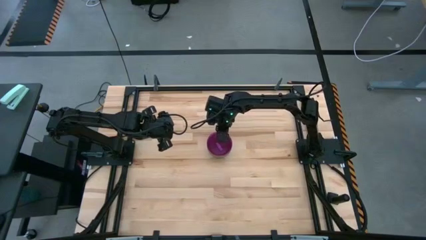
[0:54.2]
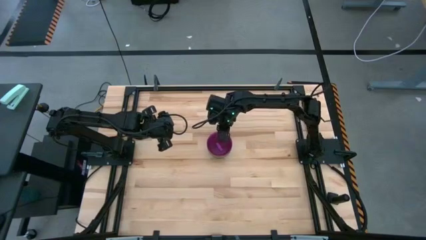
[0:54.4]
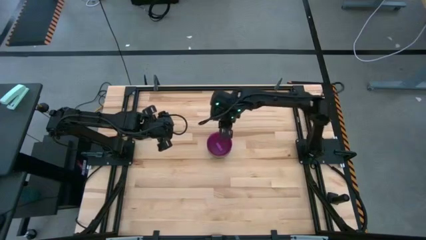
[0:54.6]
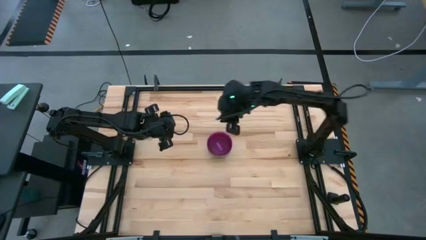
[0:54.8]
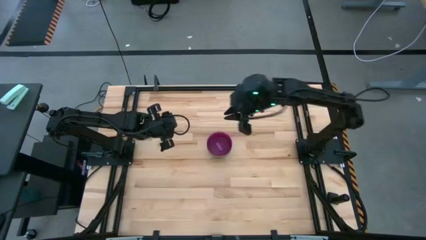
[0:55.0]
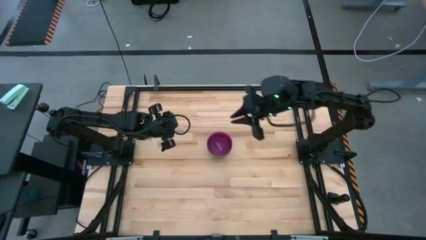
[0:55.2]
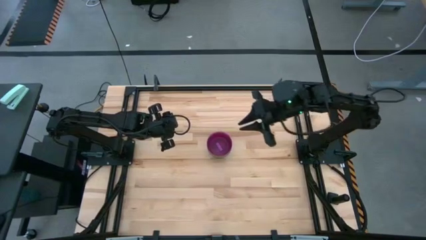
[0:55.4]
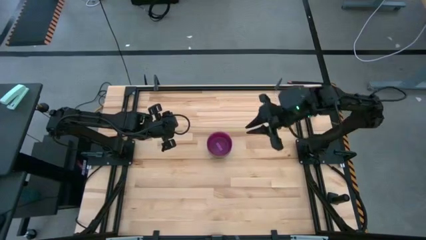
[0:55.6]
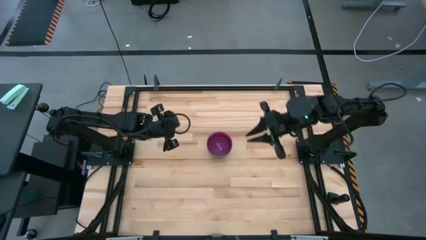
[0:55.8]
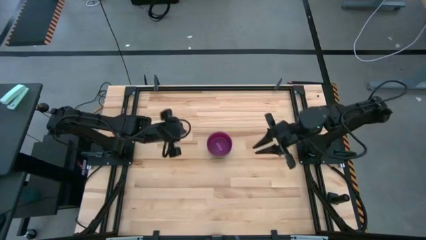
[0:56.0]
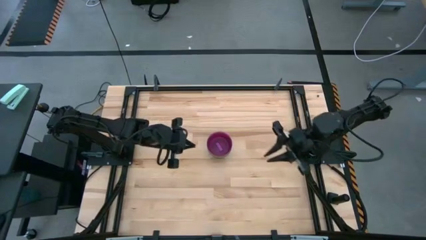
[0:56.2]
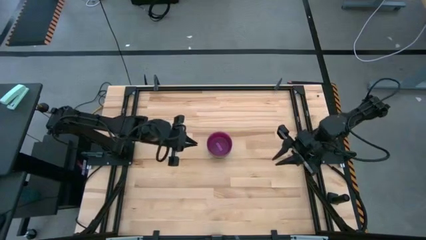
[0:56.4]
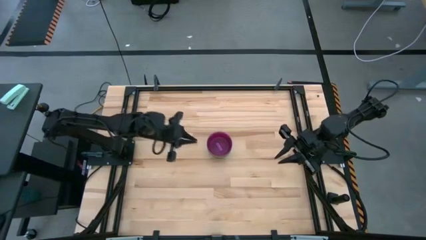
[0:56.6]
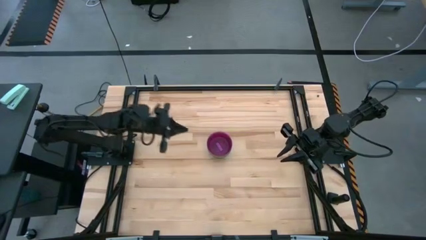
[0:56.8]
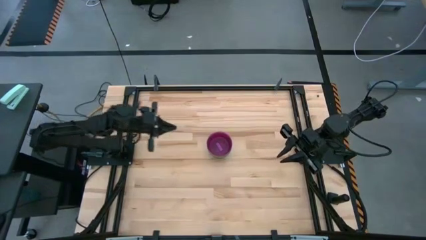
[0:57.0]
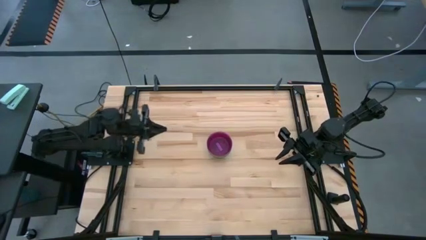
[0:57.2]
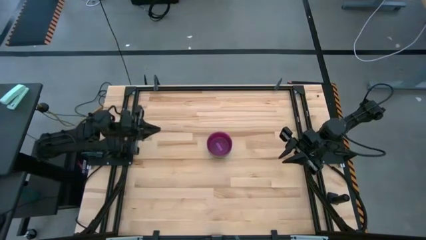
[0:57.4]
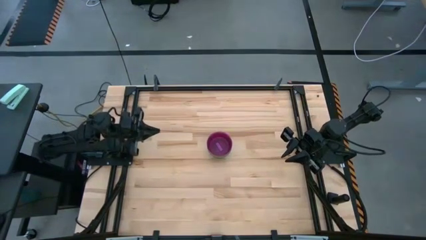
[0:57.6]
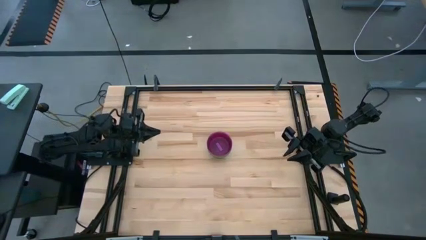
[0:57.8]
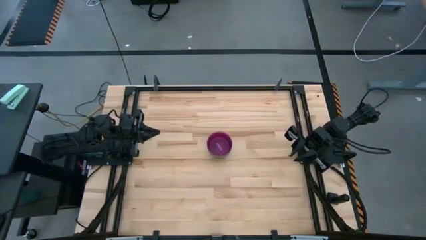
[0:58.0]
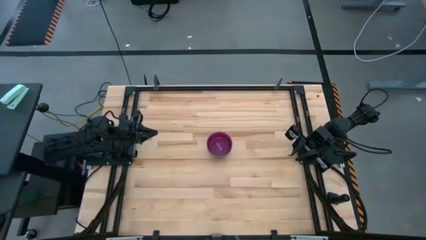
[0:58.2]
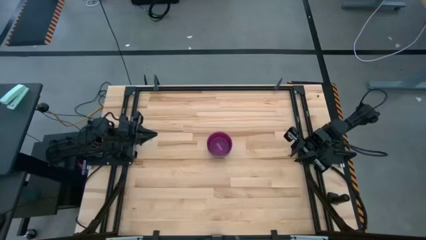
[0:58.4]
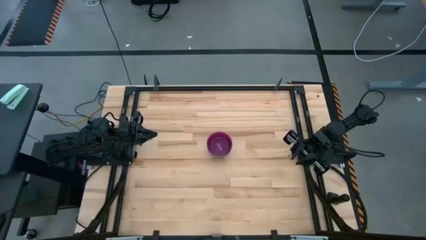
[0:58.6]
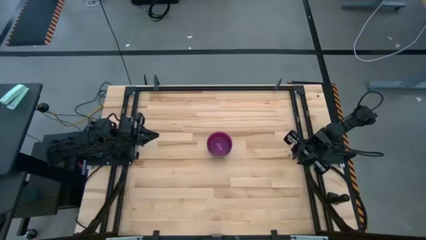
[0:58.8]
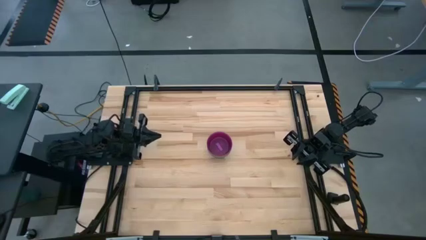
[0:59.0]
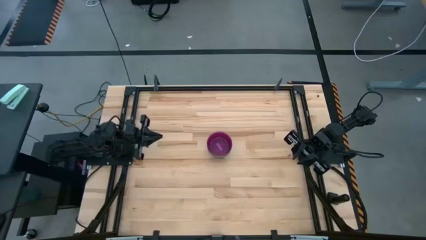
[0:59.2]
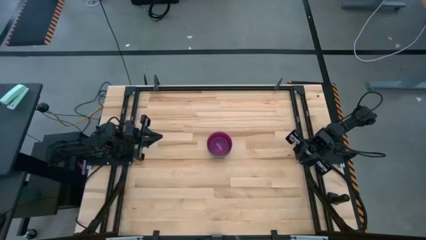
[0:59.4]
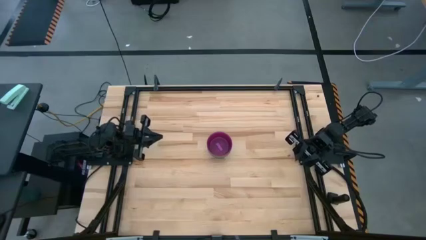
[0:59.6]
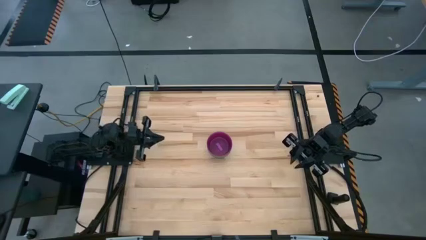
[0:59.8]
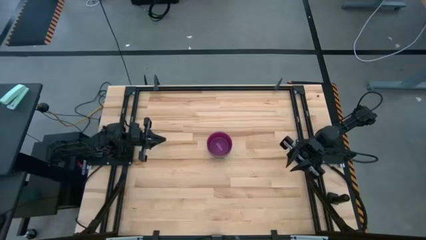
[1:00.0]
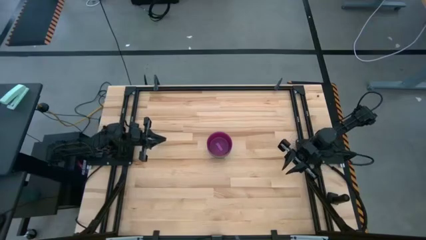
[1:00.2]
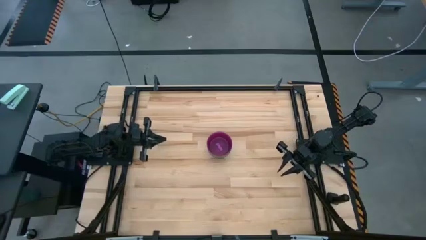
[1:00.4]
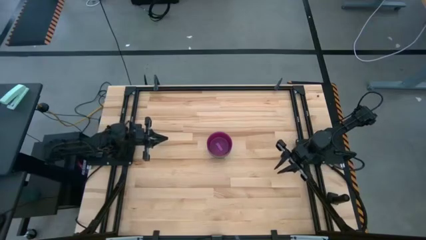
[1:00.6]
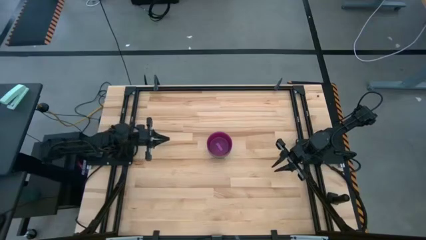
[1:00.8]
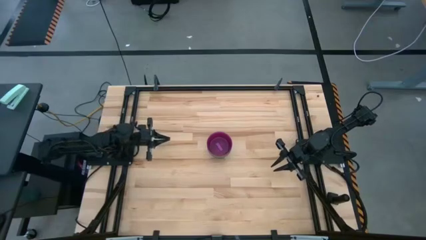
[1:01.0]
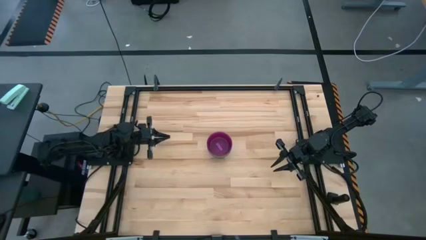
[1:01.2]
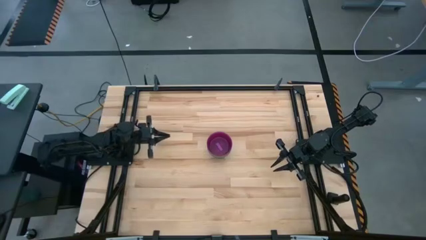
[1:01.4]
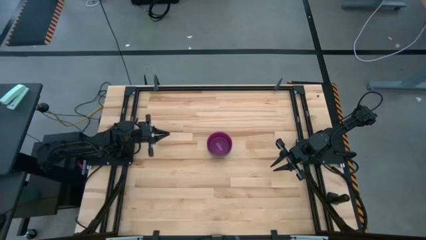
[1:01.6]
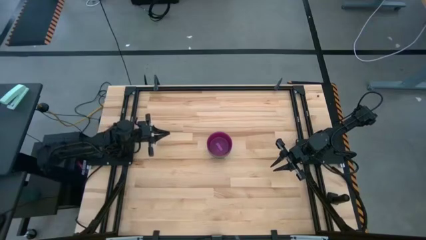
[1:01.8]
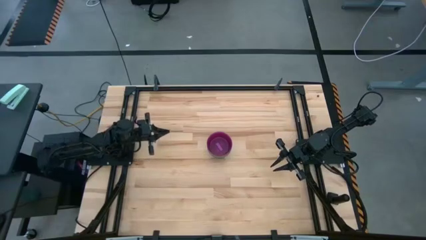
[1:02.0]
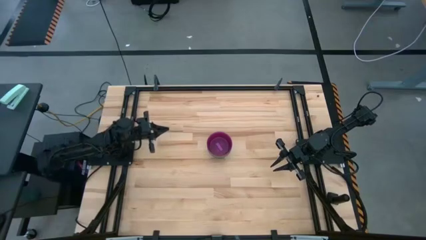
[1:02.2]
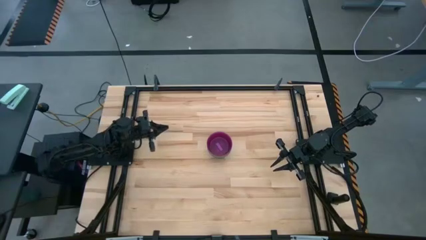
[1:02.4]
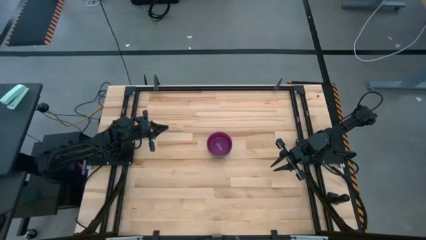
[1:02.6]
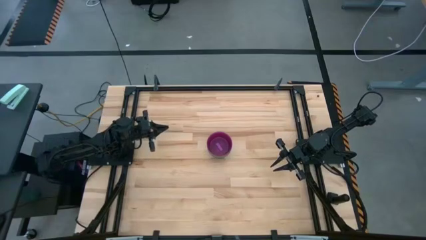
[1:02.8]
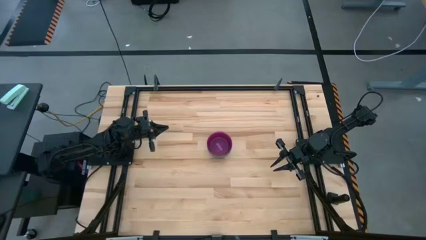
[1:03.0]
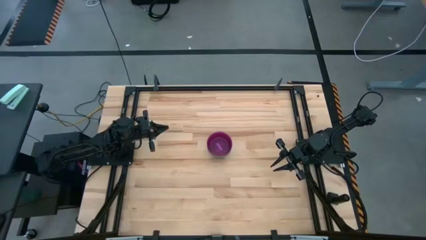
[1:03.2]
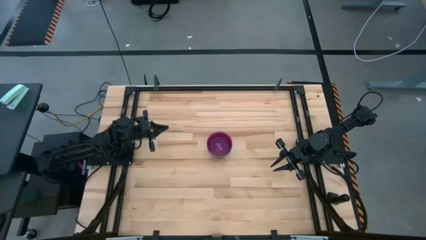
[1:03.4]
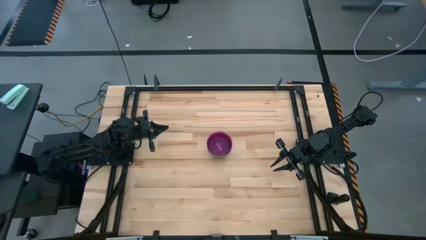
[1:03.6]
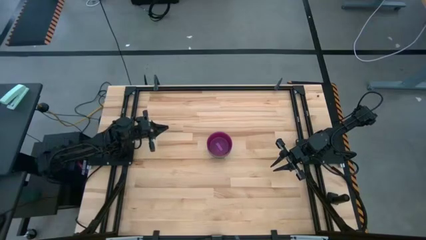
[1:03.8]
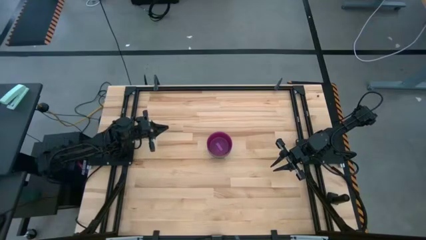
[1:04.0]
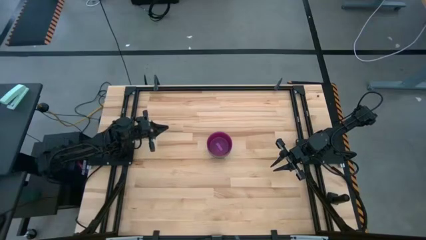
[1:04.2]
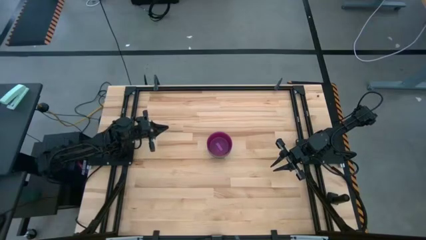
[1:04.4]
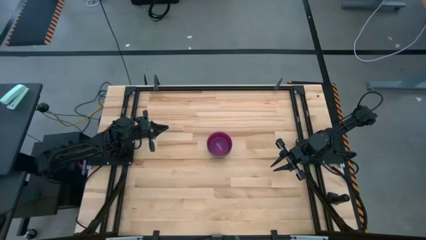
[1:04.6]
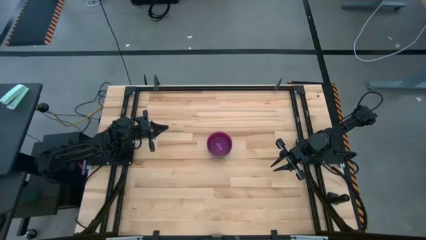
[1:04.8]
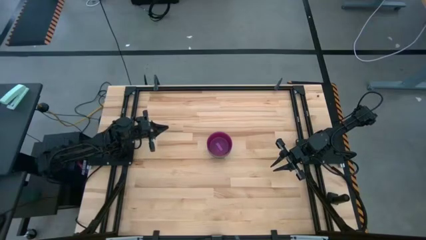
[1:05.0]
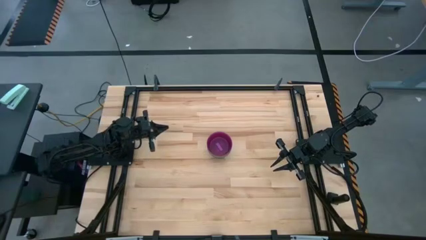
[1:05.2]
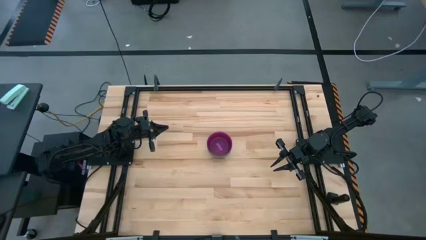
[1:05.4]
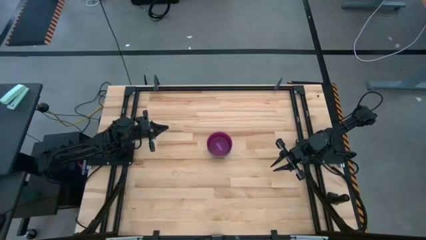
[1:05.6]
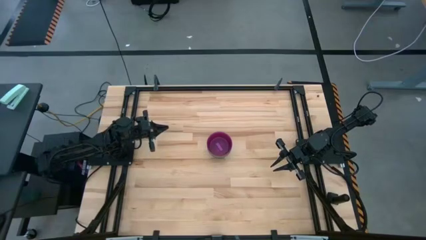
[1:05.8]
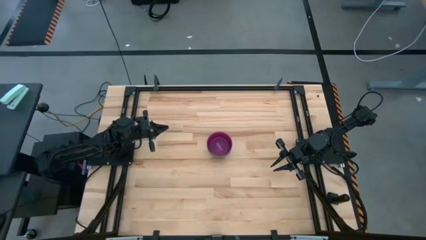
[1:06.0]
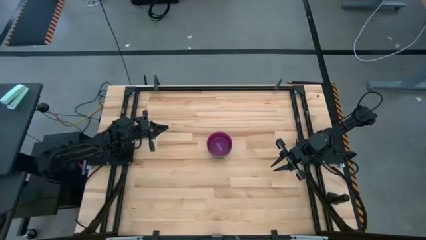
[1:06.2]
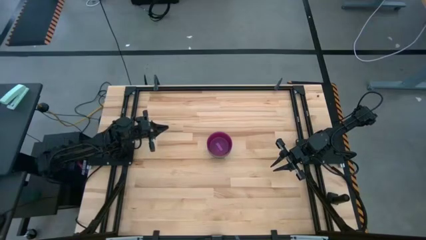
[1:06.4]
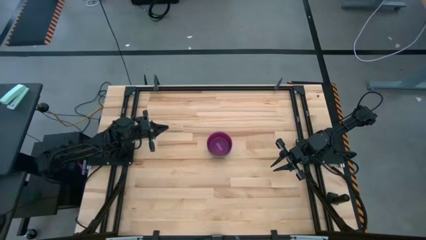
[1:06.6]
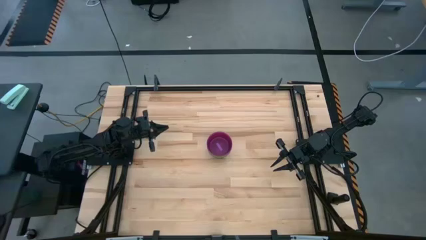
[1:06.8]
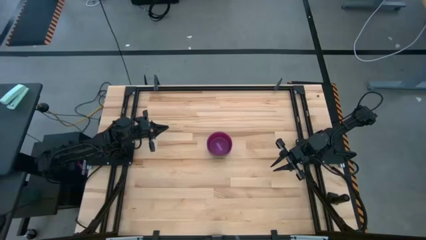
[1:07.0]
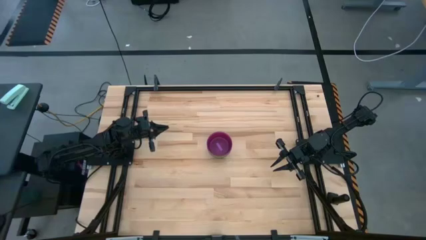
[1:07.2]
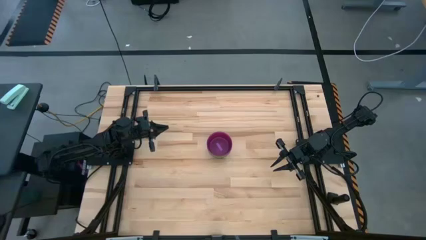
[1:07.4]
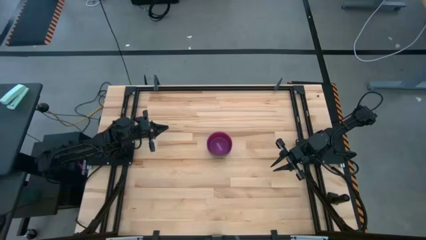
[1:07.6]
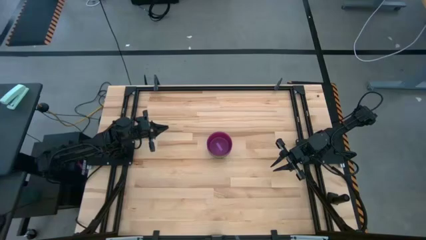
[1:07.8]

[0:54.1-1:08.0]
Task: Nest bowls inside each other
Return to Home Position
